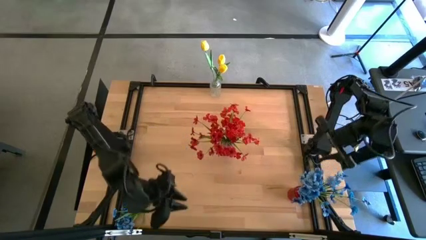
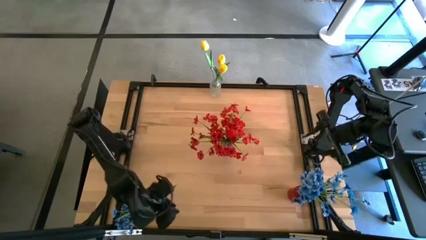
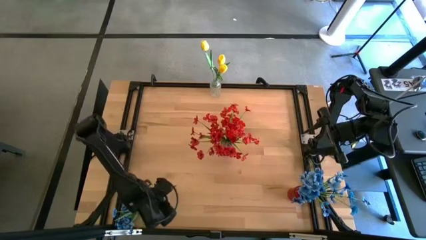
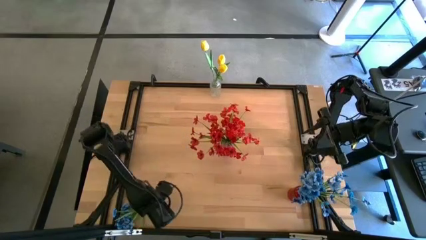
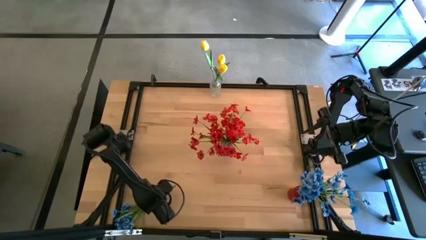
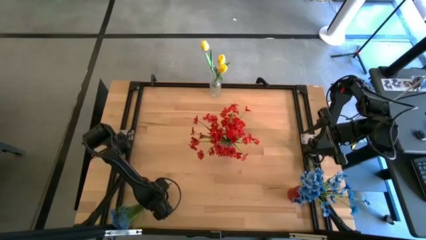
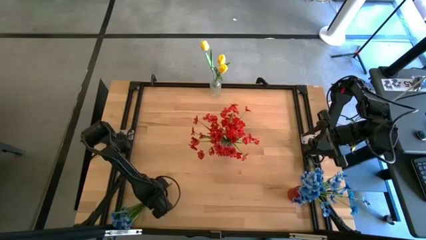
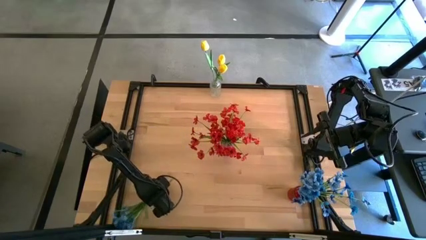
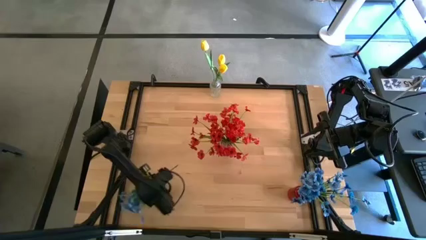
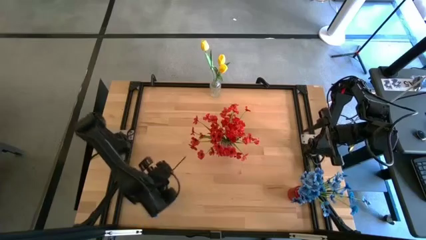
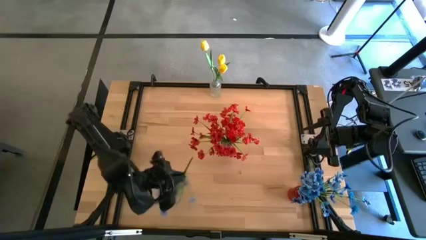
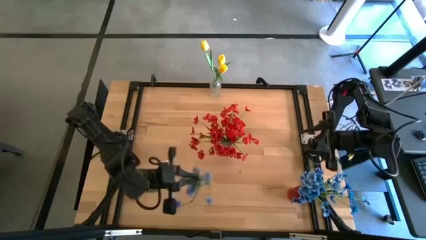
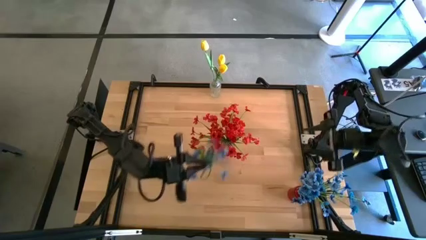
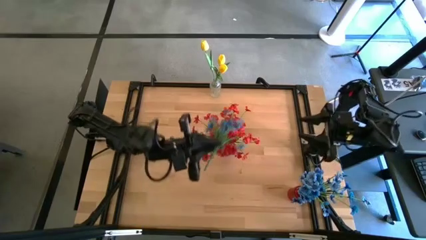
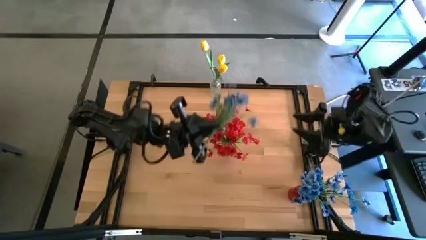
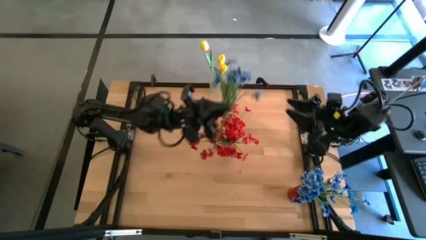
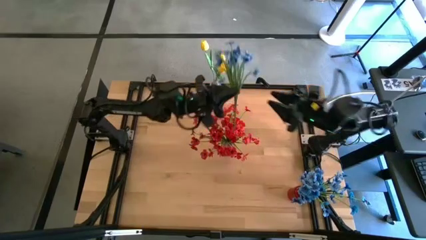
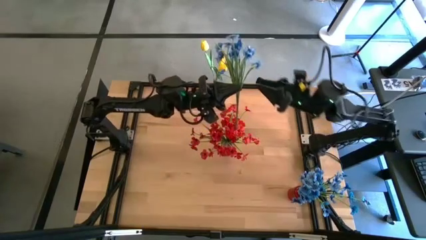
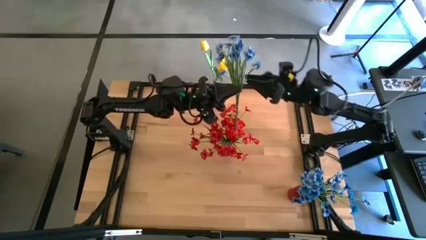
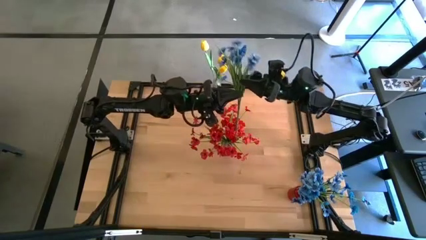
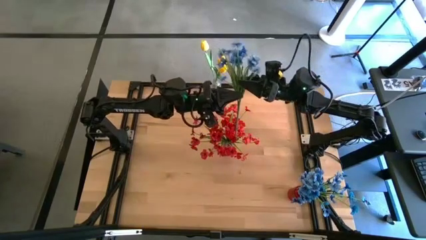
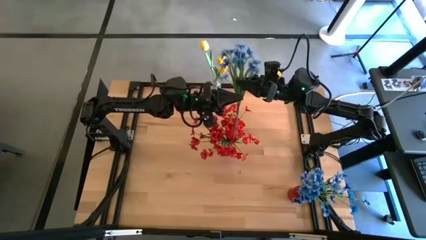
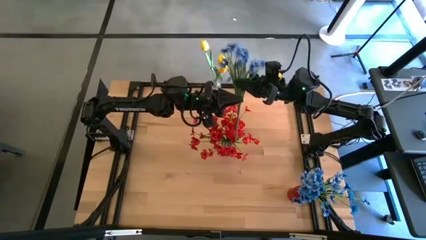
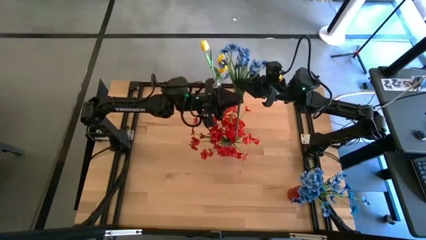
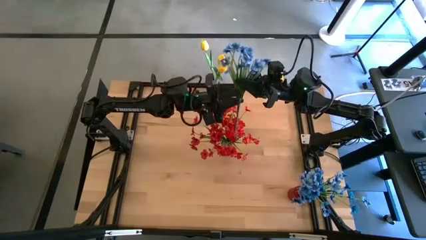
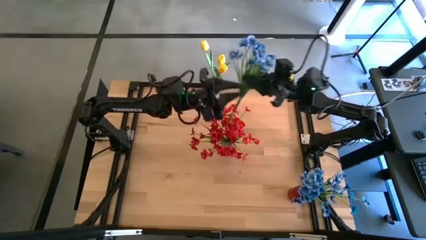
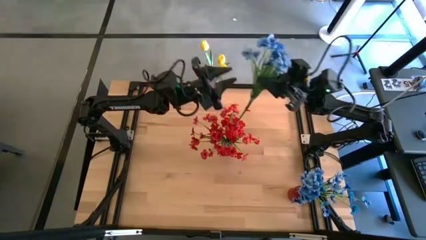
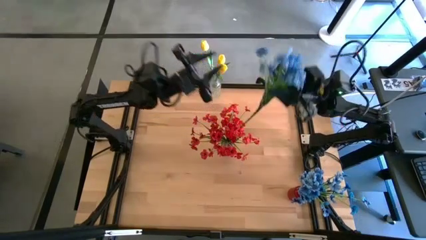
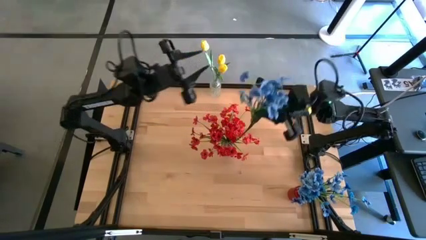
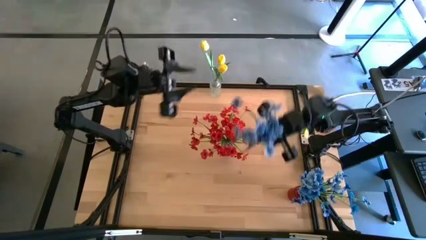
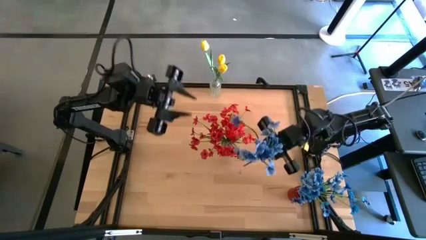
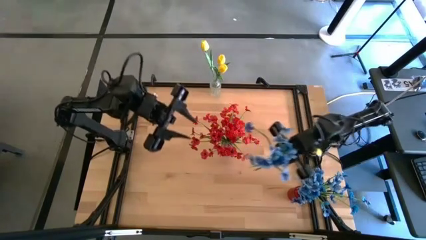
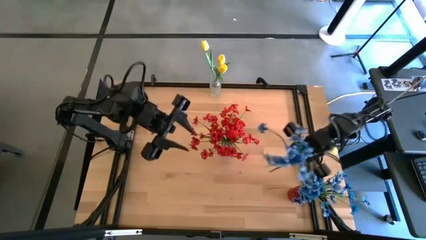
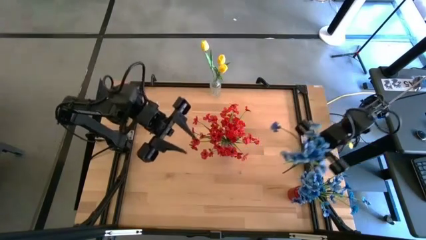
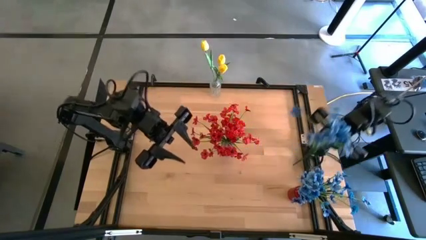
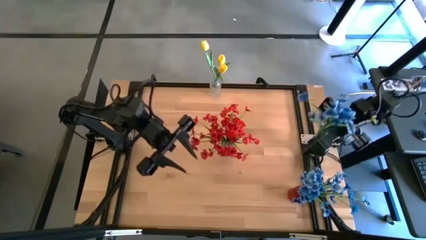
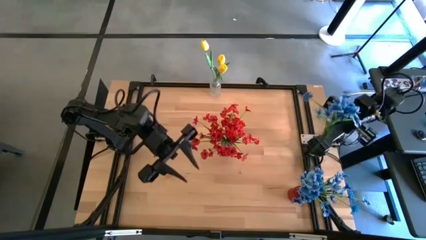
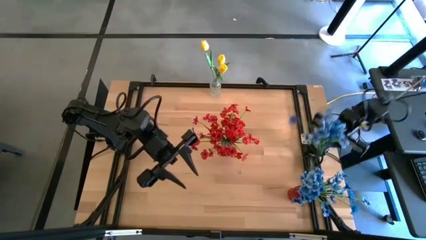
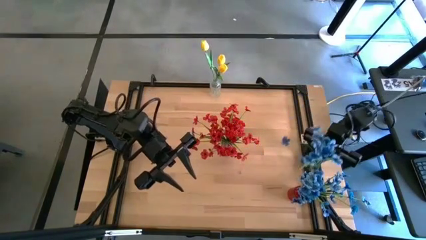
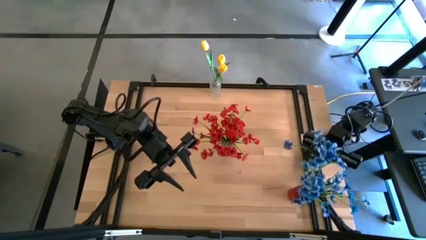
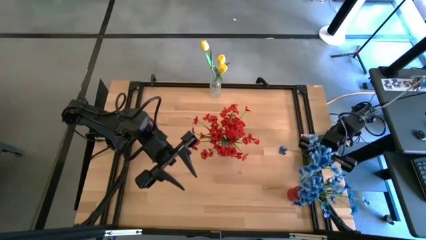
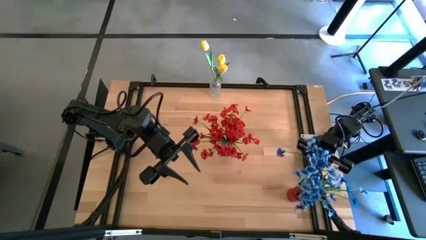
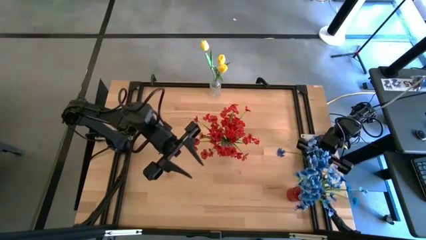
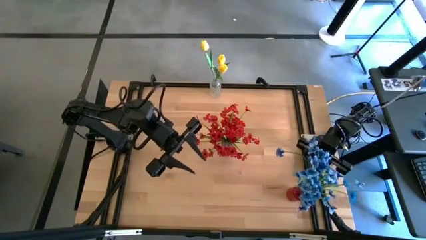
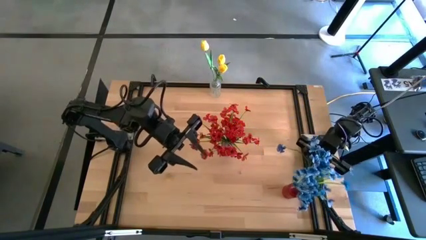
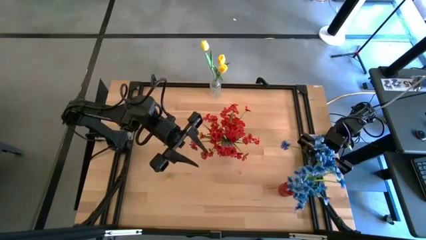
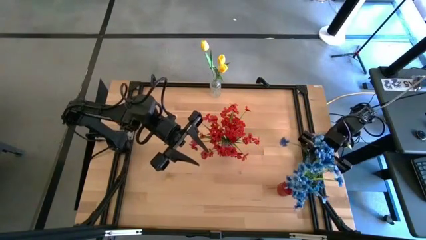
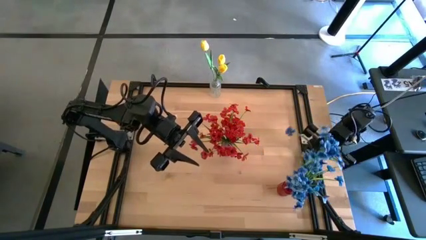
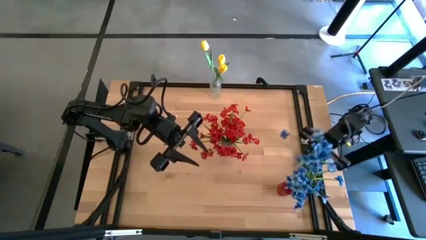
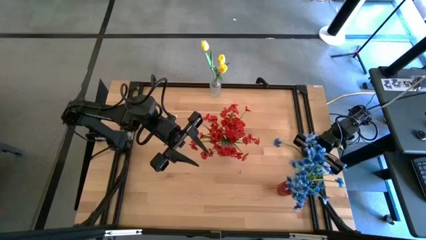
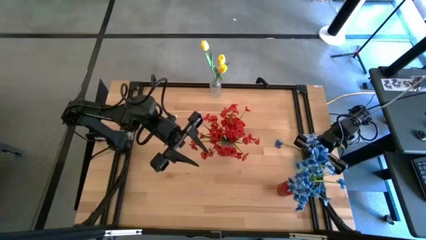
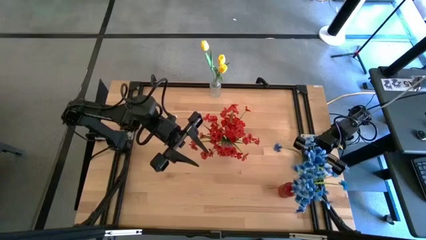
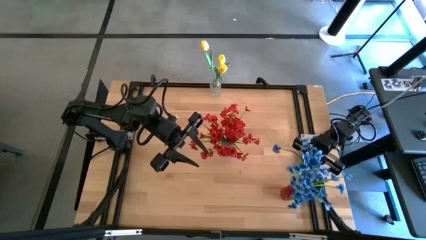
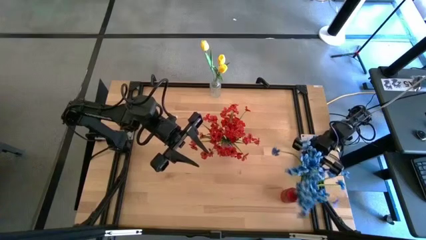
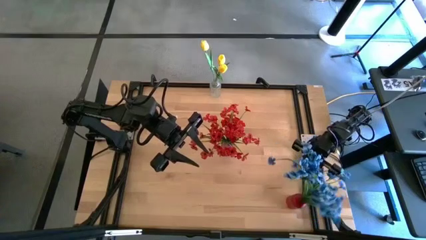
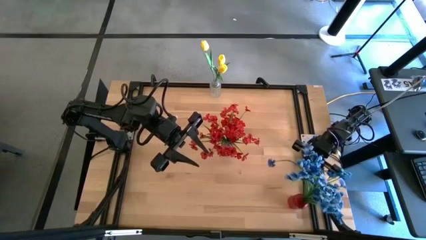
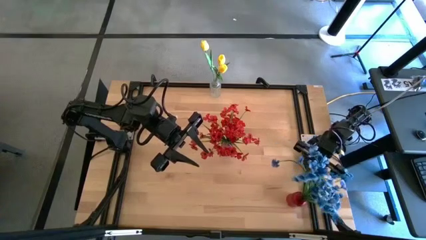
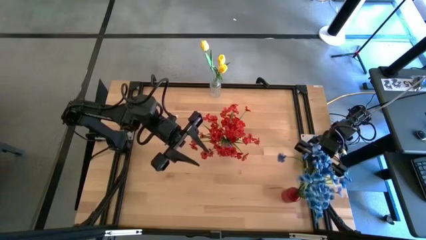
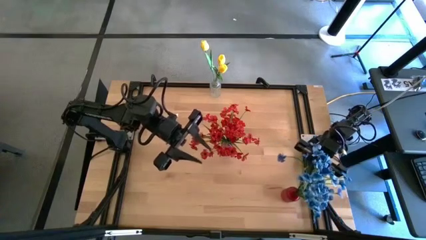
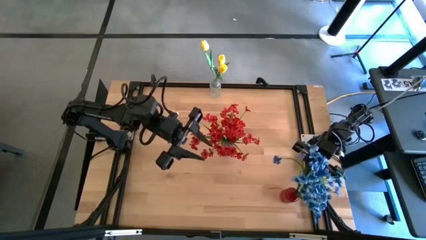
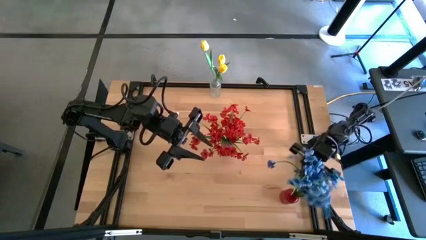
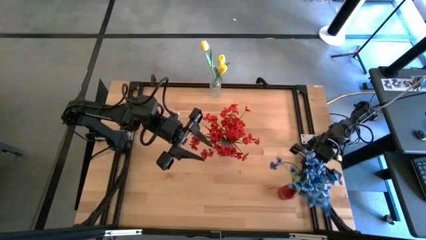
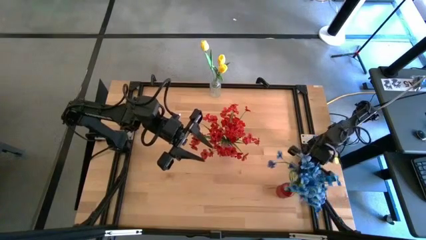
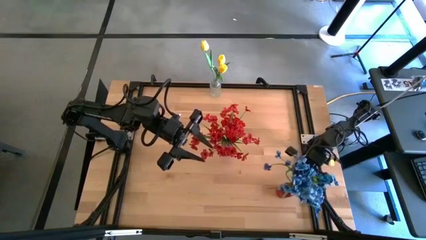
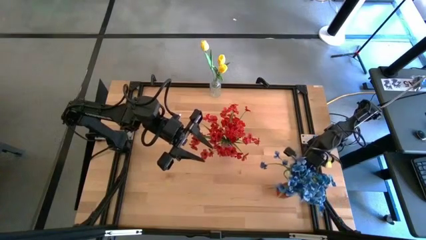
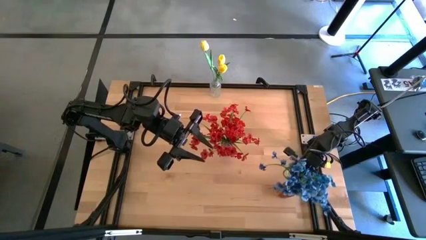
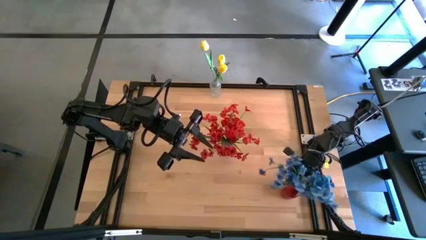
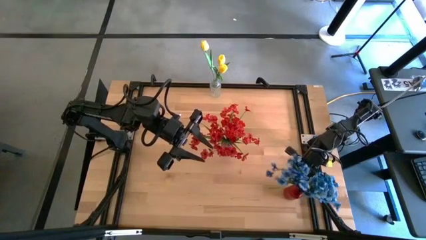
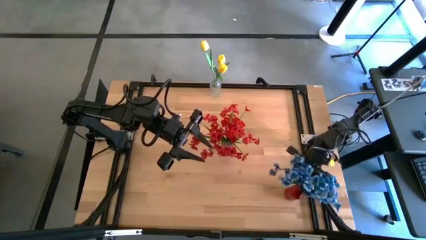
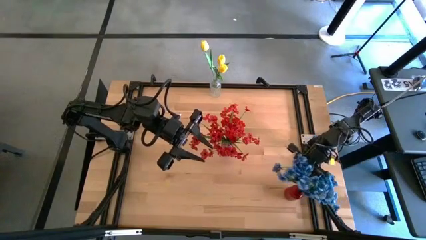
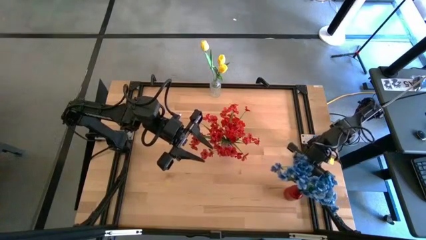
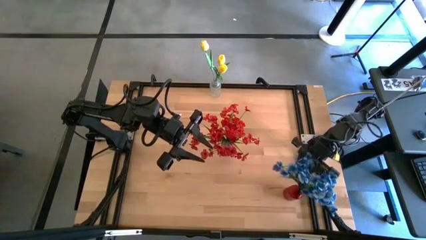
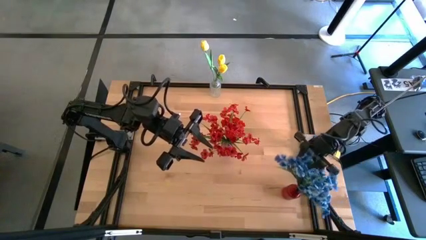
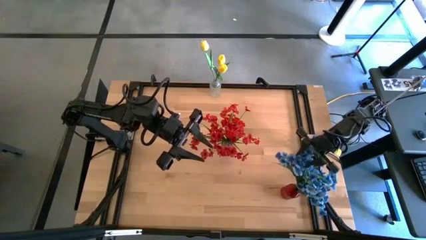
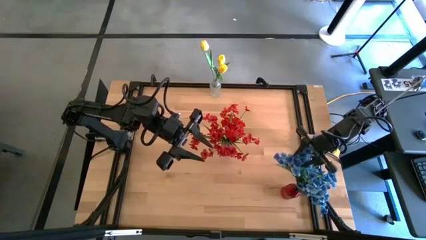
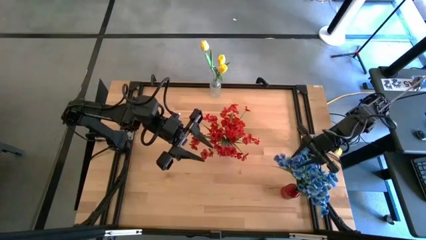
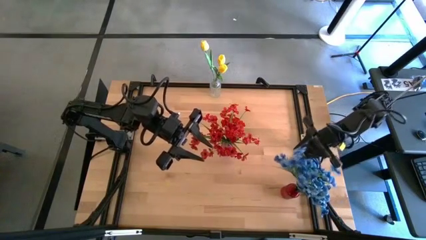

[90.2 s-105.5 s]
Task: Sort flowers into vase by color
Put the blue flowers into the red vase

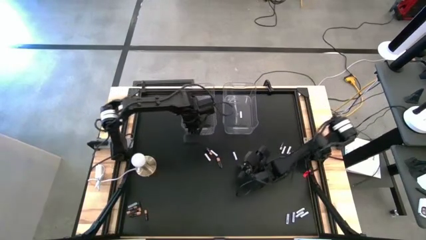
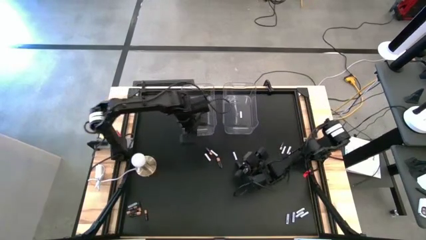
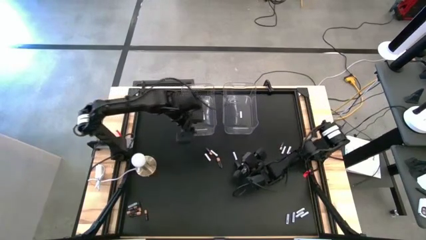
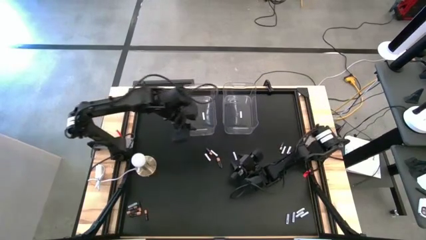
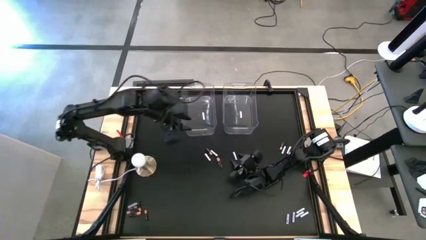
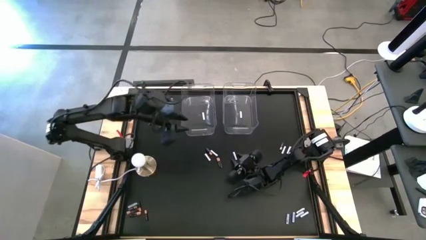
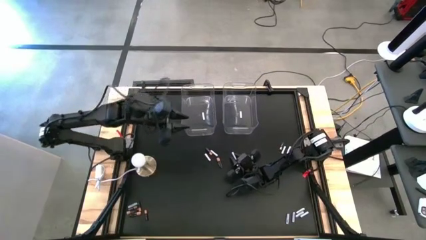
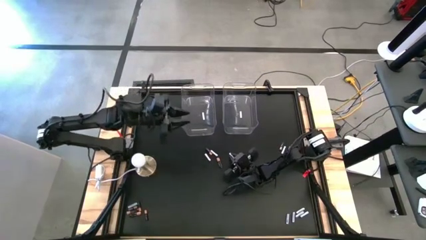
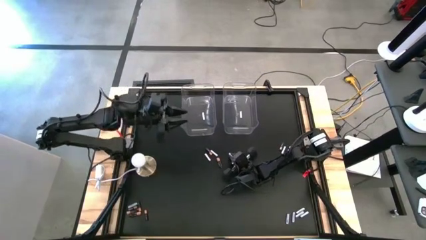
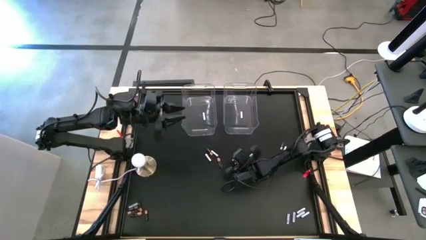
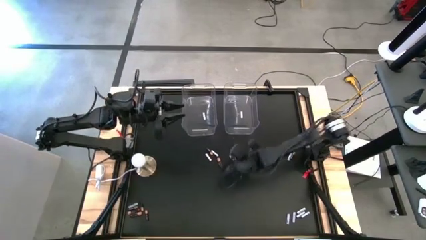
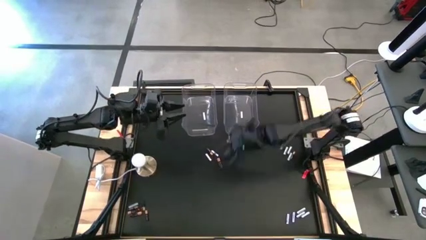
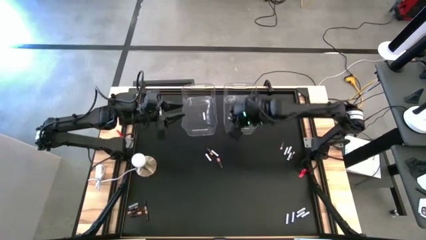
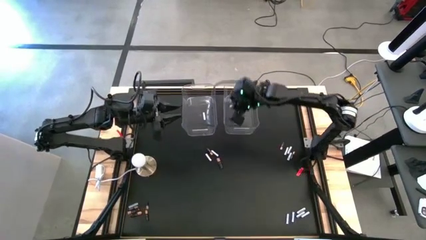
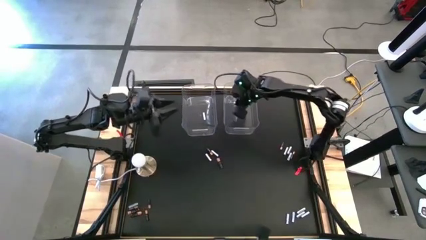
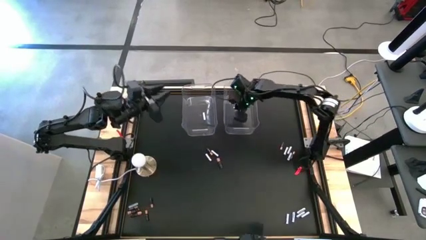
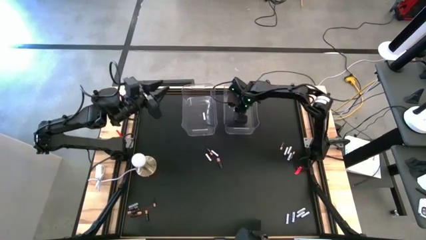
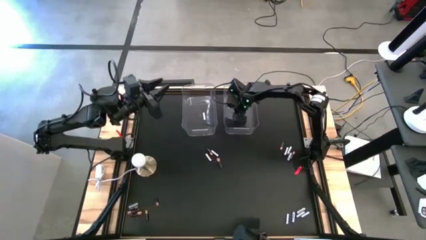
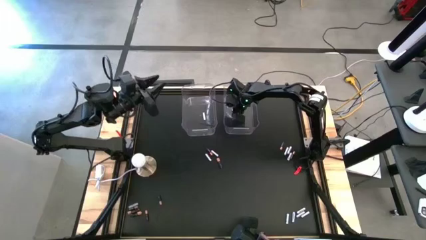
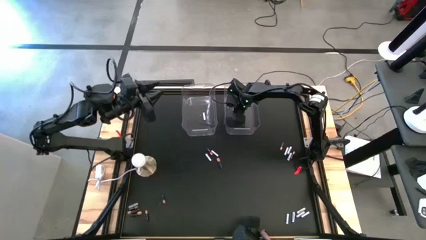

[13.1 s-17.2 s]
Task: Sort batteries
Put the white battery into the right transparent bin
